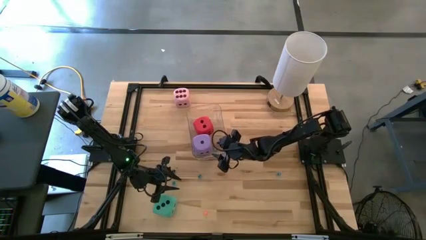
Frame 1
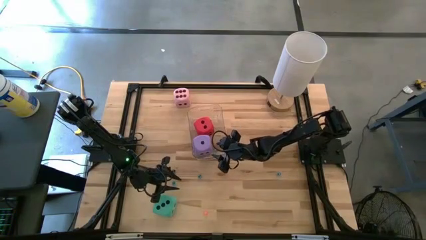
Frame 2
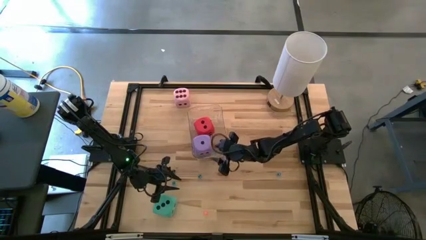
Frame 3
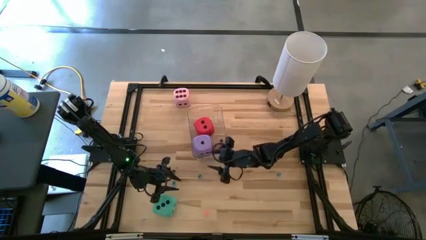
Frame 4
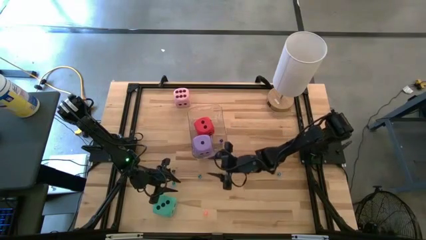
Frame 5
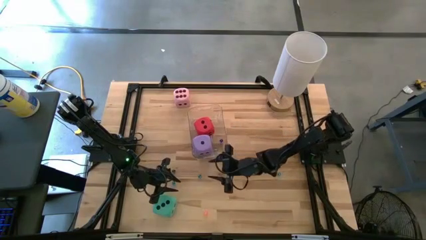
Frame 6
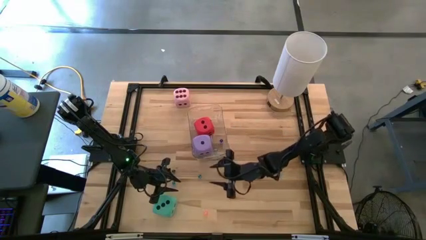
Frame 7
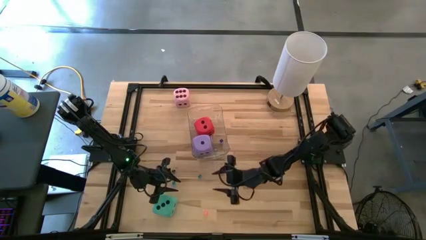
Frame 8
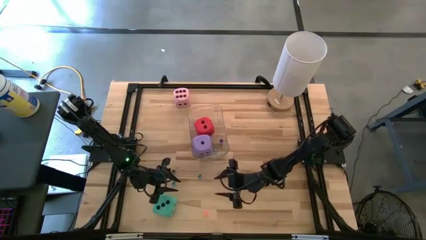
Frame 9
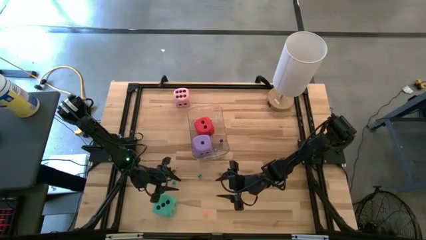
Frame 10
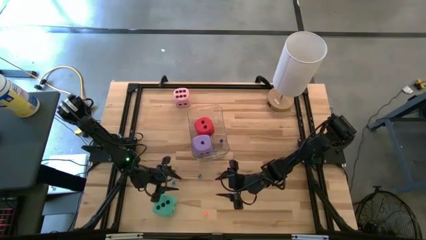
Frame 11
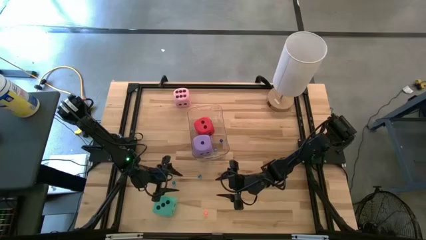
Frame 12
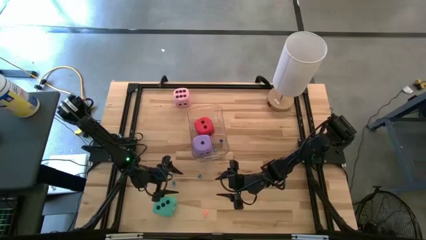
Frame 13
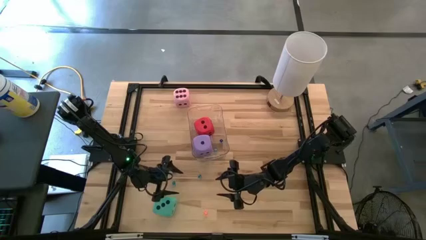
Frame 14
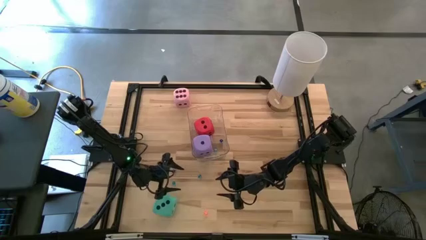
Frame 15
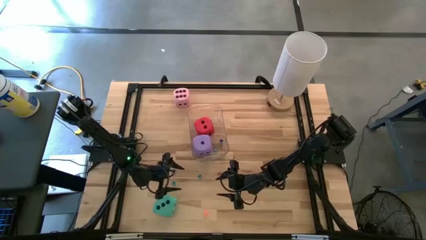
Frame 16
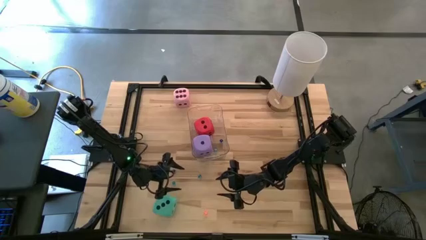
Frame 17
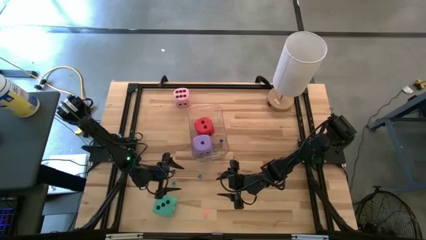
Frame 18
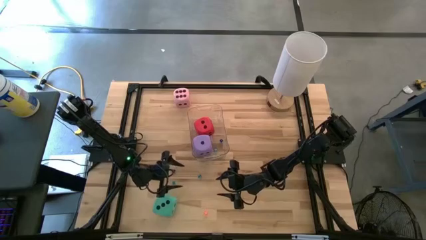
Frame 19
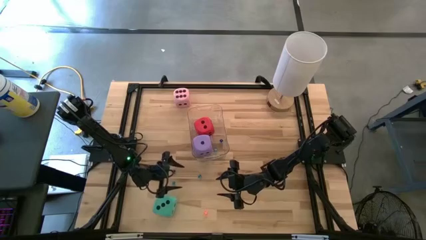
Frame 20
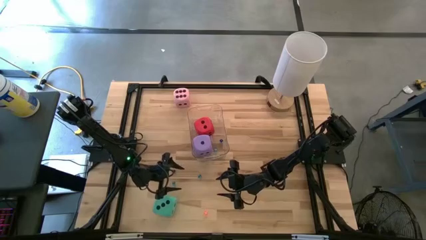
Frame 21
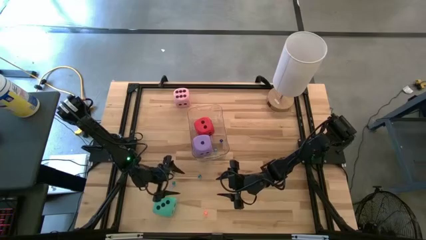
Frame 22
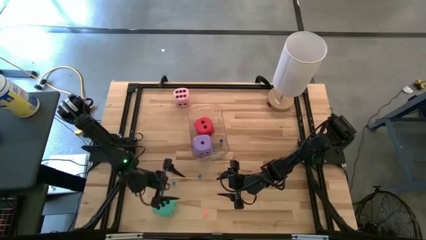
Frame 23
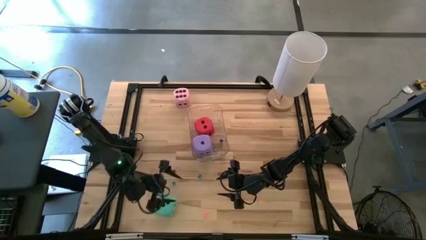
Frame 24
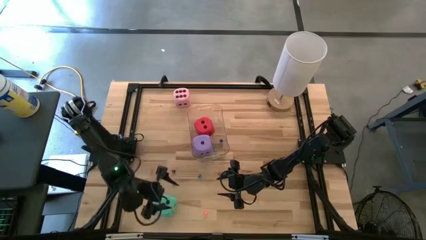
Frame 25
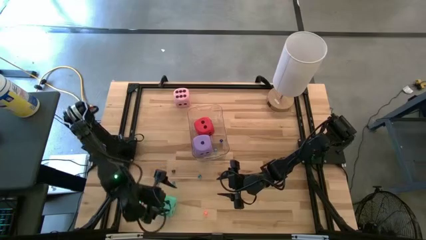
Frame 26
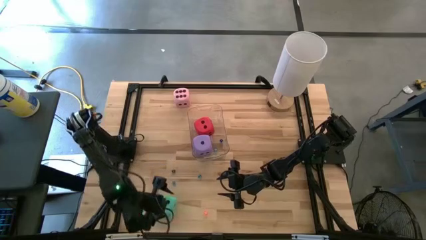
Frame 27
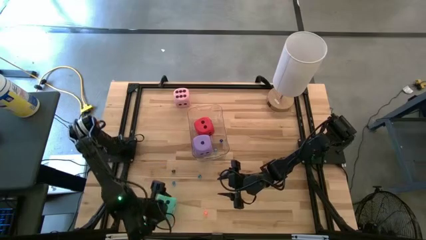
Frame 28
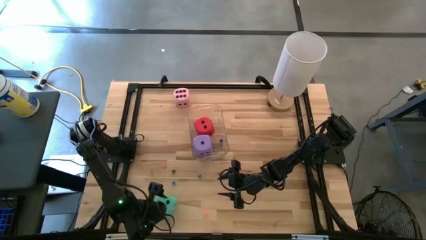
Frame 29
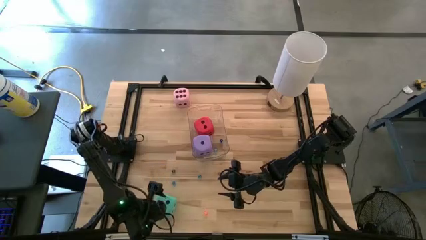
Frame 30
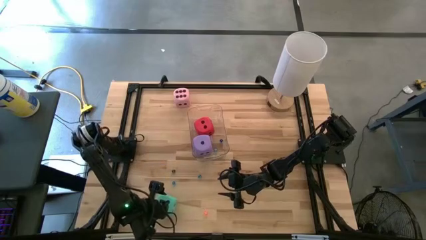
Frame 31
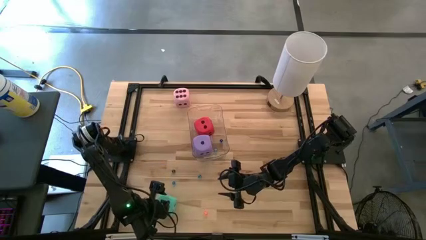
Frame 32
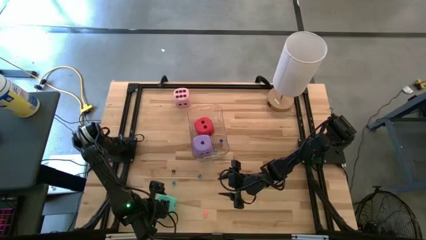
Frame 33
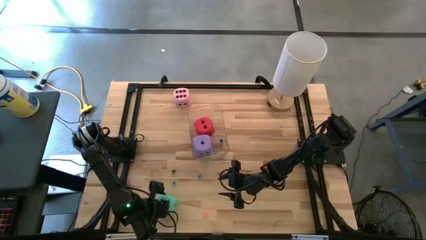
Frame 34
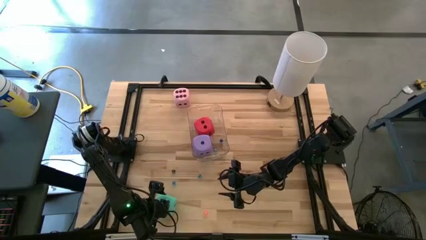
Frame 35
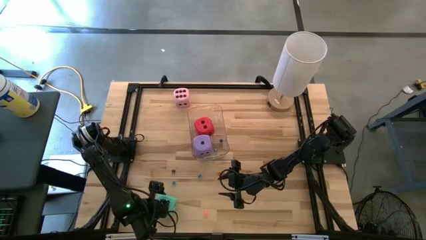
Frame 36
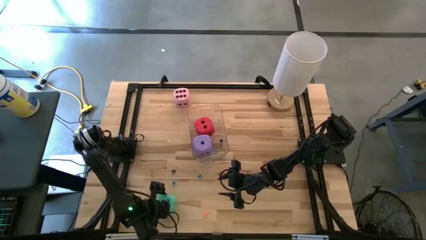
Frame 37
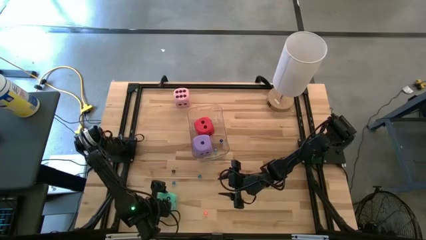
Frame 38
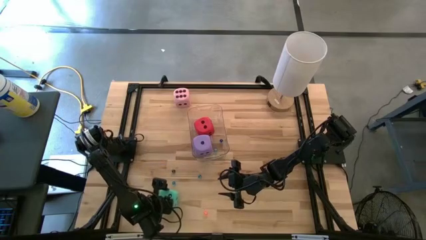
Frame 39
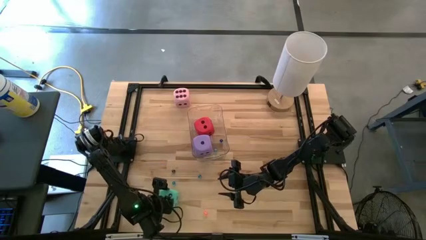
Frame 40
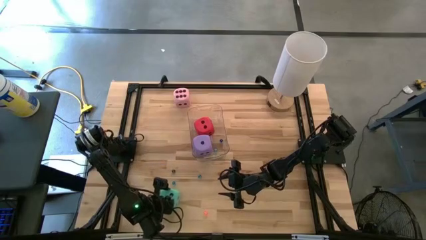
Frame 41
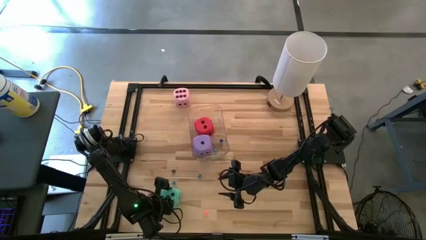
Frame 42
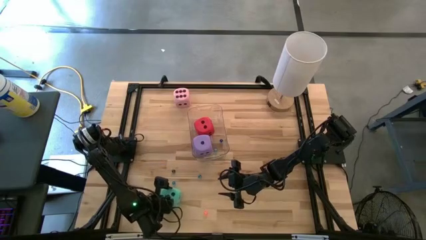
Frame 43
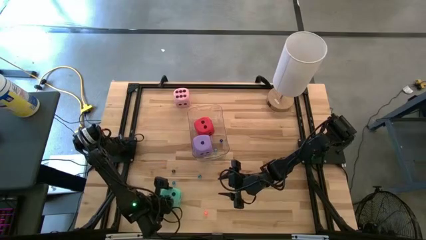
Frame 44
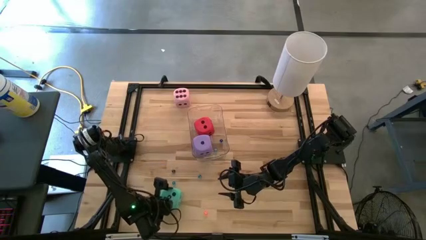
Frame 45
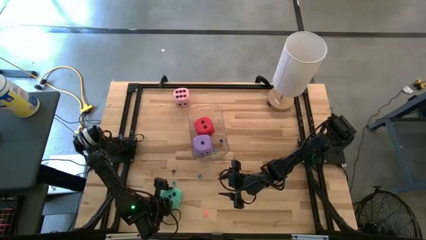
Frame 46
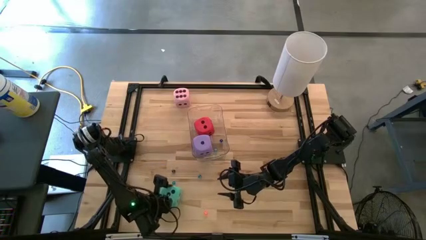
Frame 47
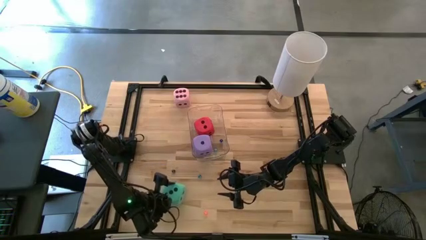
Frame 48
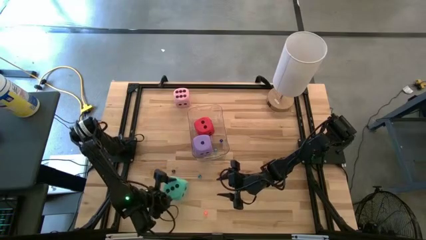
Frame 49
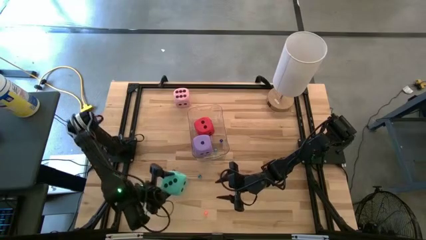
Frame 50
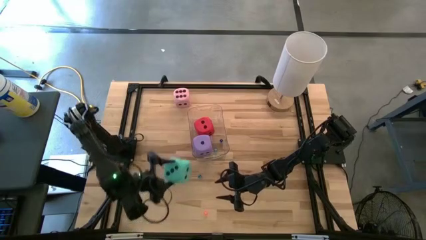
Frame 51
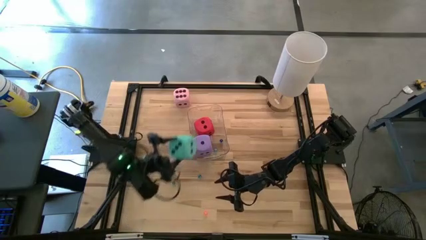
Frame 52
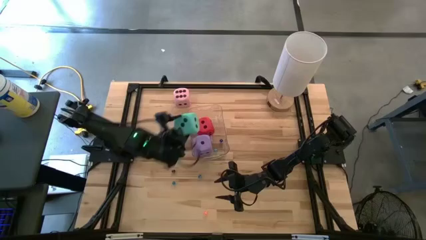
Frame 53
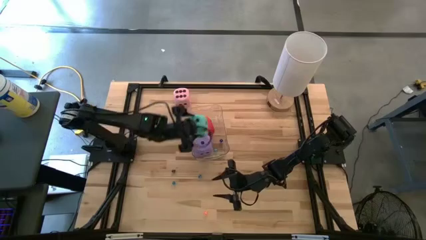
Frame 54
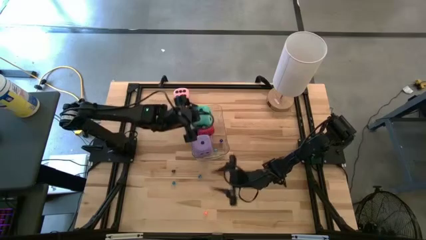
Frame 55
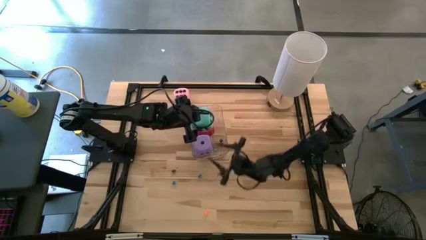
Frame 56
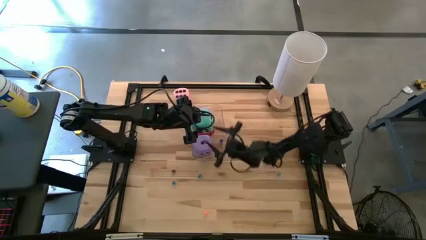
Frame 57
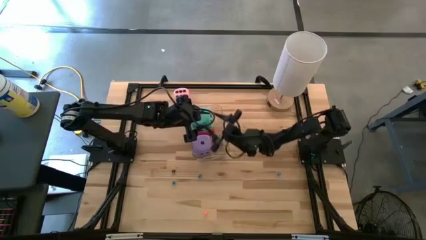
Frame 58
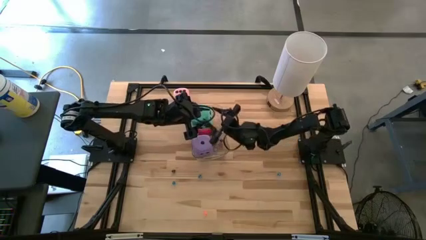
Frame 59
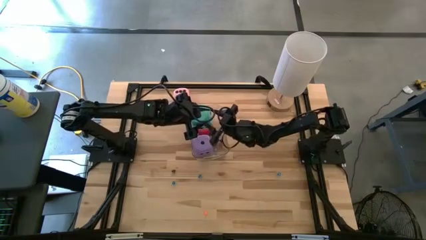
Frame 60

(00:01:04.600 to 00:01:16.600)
Task: Pick & Place Dice
Put the large light blue die into the transparent bin
